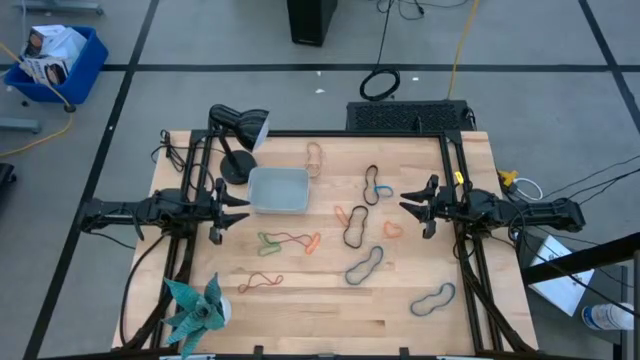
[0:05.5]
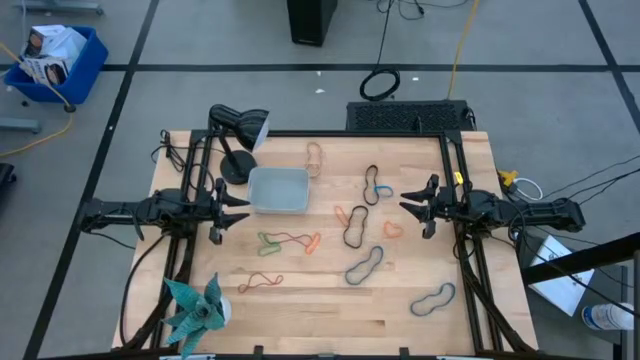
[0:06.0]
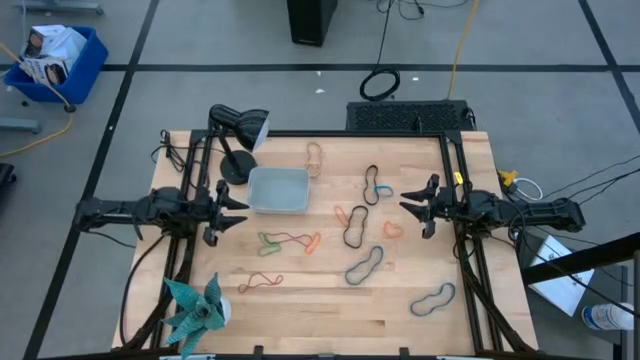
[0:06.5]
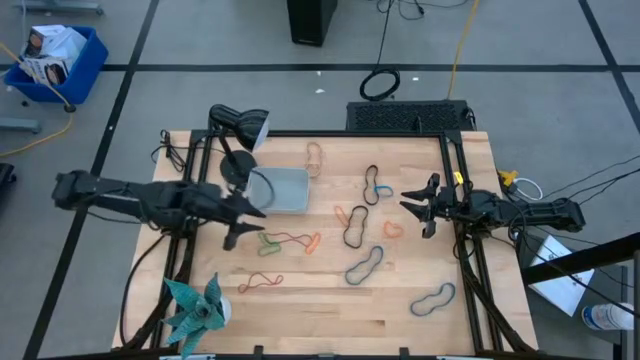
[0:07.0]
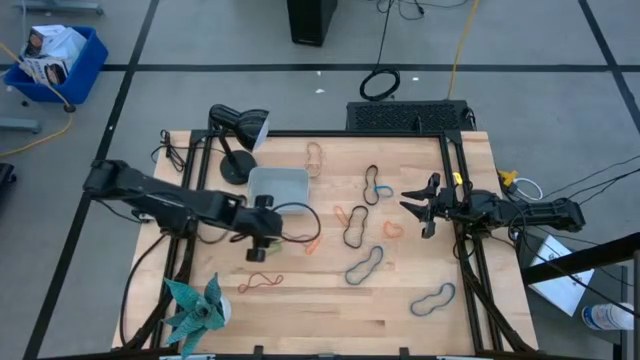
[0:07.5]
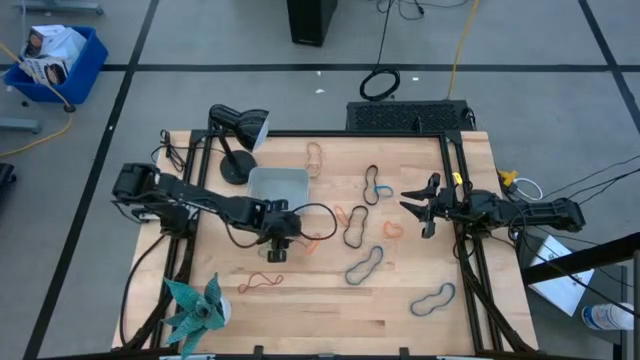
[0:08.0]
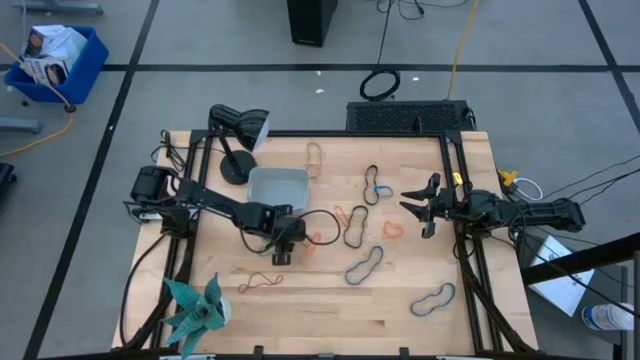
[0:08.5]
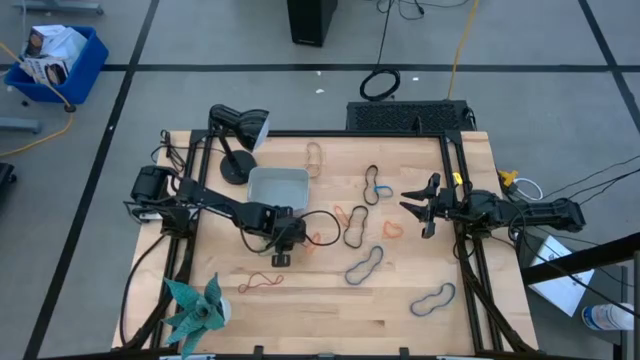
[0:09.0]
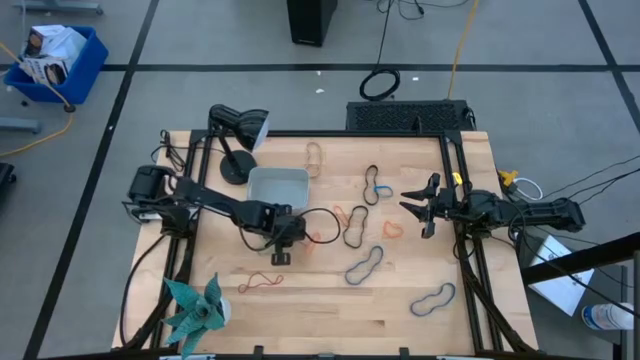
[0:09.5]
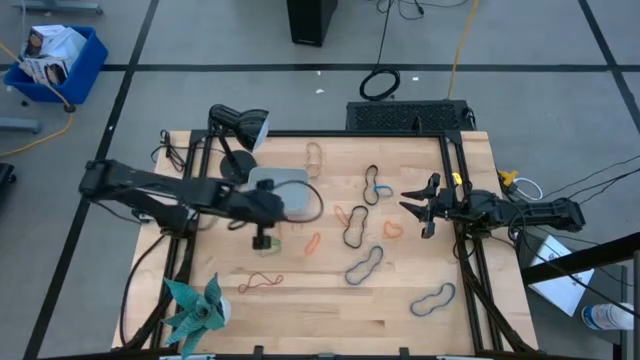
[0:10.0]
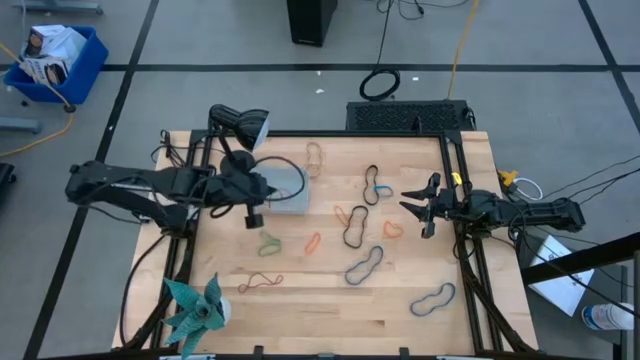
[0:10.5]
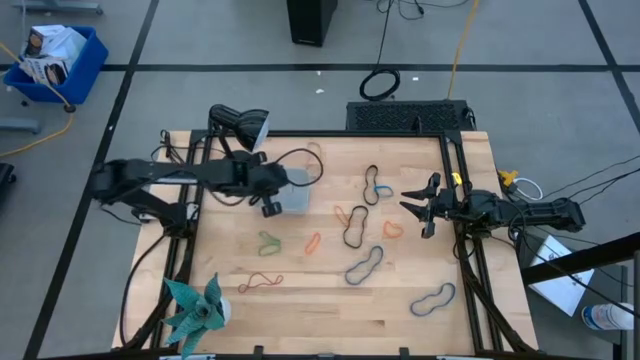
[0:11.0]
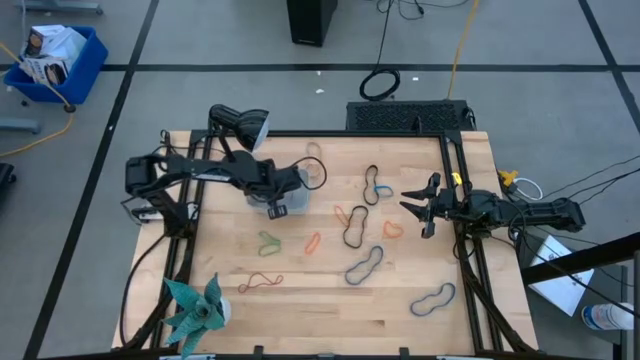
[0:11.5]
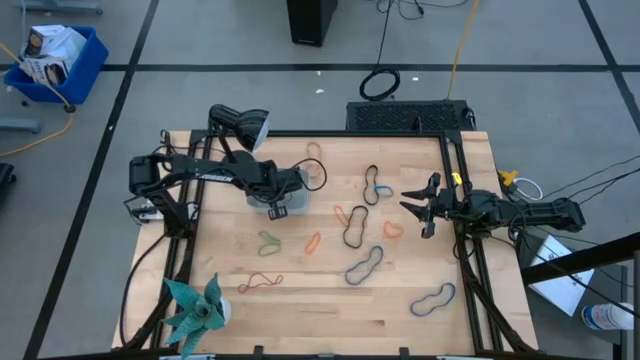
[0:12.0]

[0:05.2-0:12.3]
Task: Pick and place rubber bands into bin
Put the top red rubber band into the gray bin

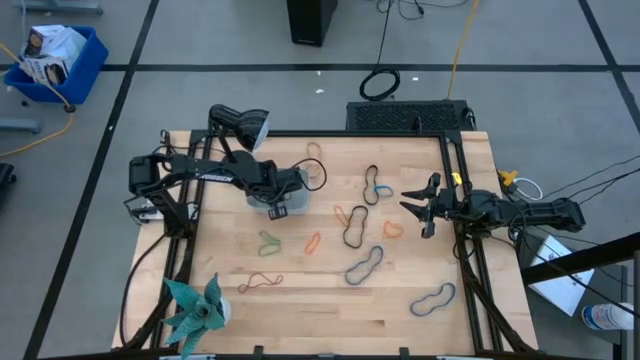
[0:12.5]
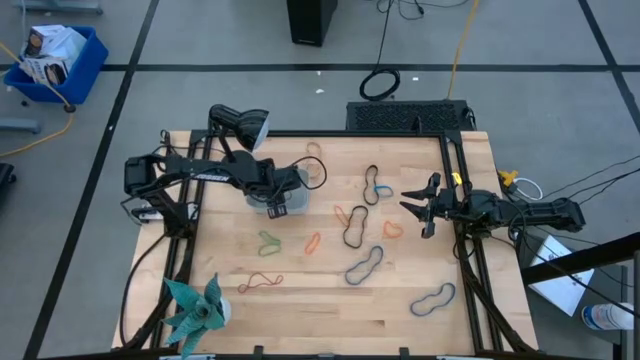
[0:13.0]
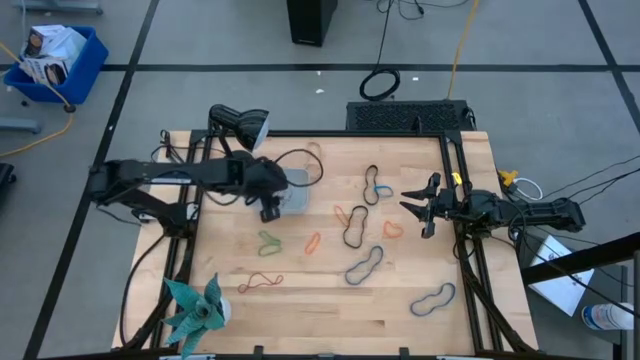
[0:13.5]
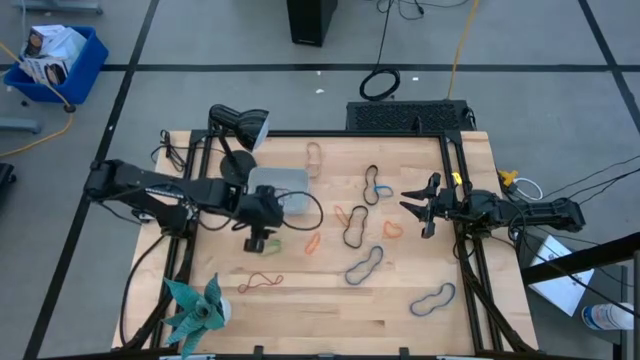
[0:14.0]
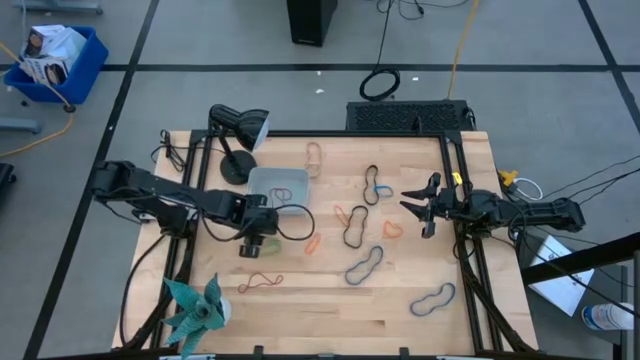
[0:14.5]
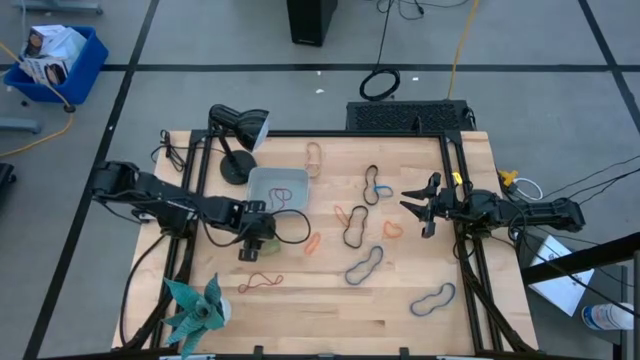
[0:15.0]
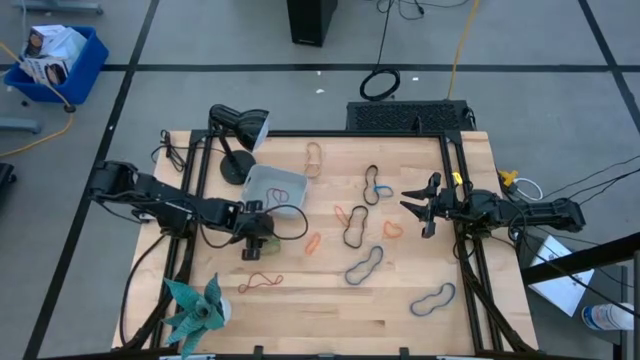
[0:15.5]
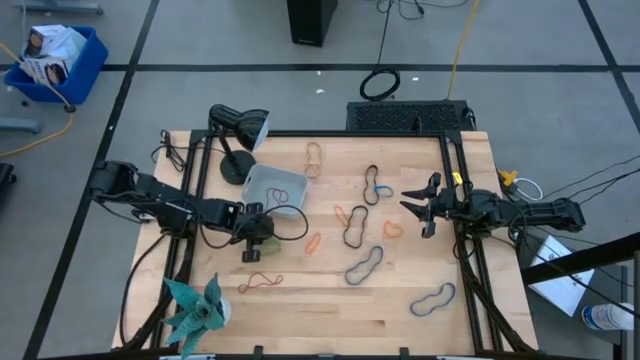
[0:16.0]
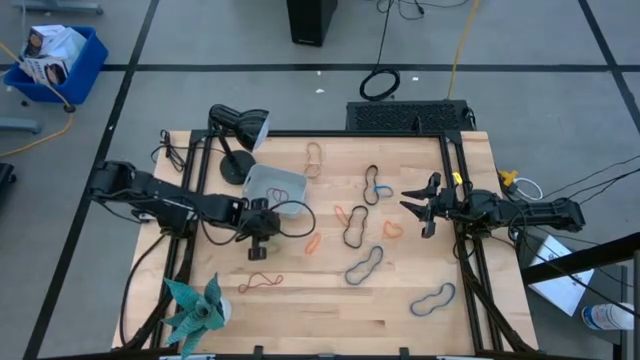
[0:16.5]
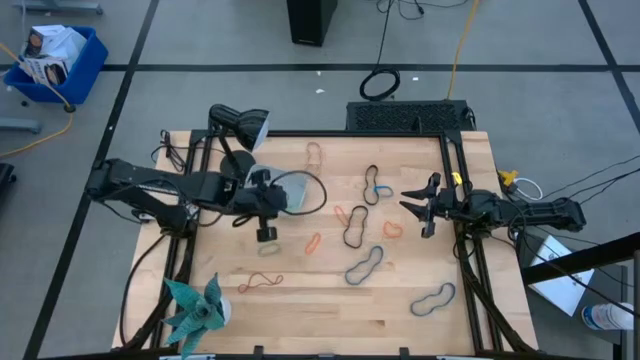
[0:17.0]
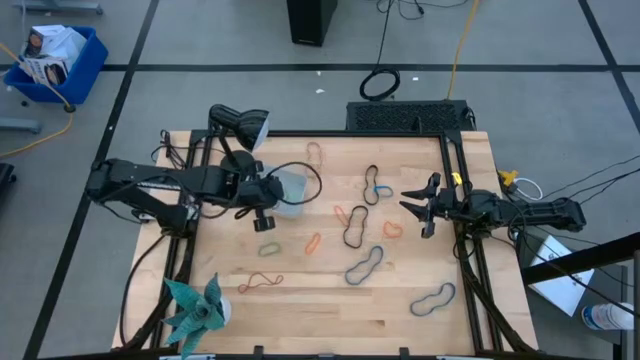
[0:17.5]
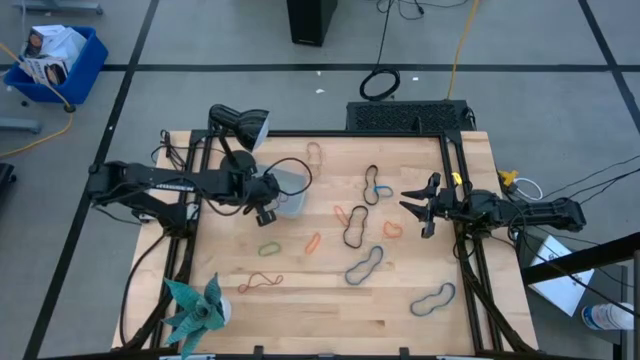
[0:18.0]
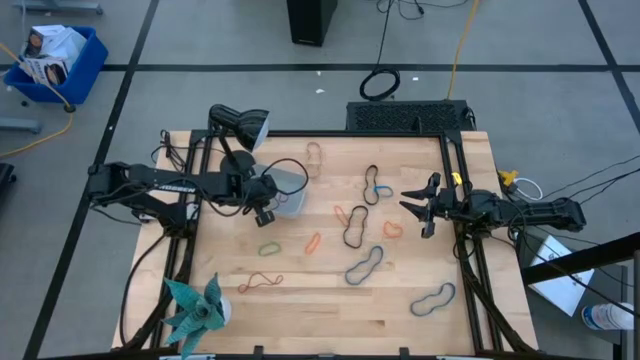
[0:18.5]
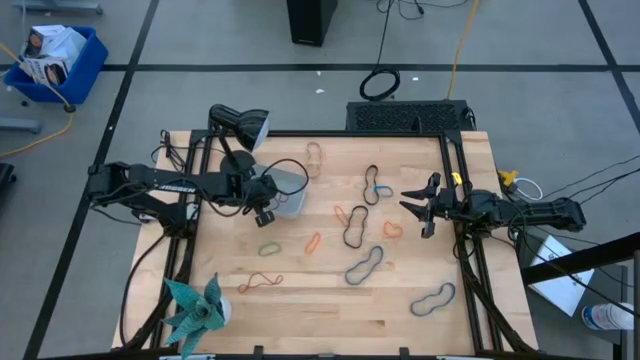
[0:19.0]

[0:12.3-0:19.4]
Put the top green rubber band into the gray bin

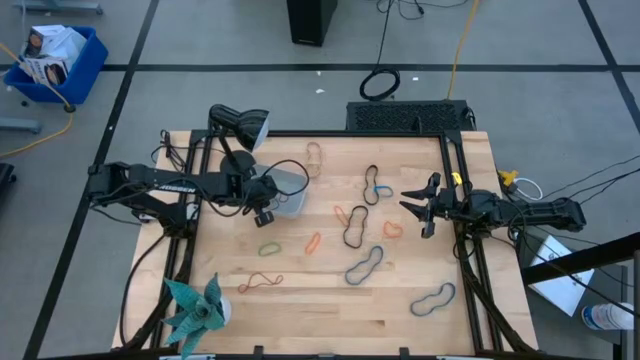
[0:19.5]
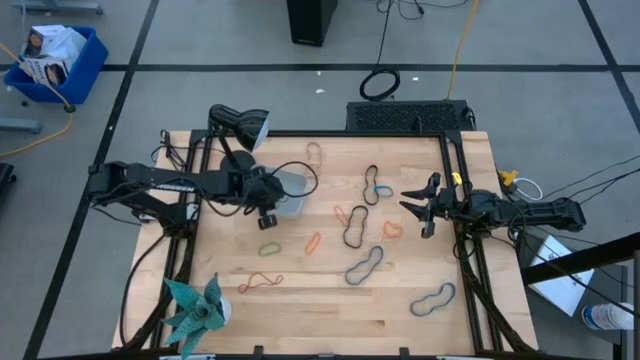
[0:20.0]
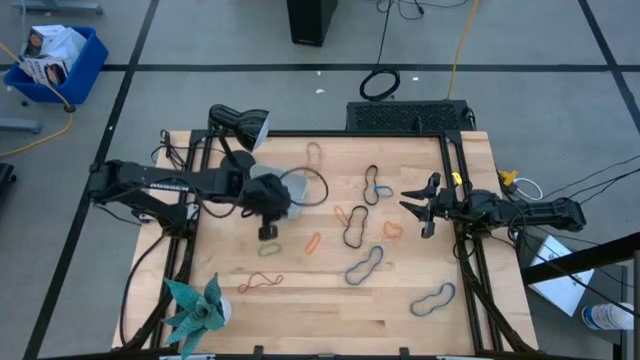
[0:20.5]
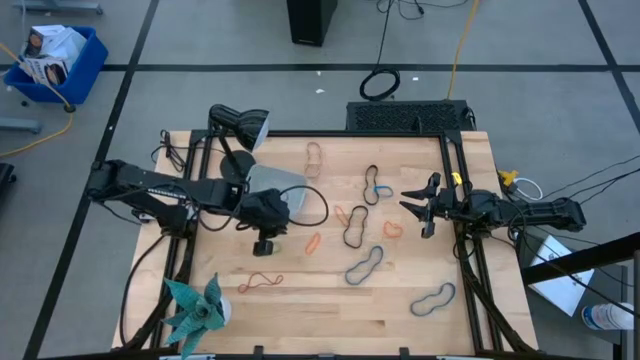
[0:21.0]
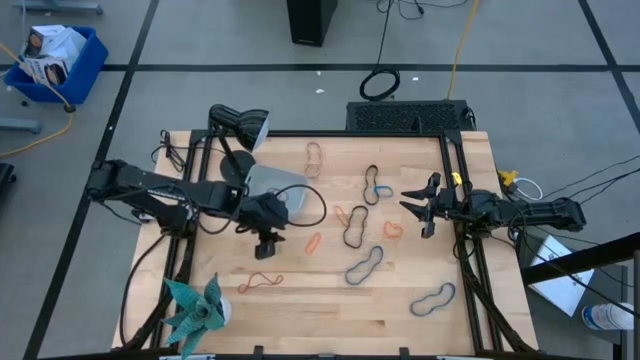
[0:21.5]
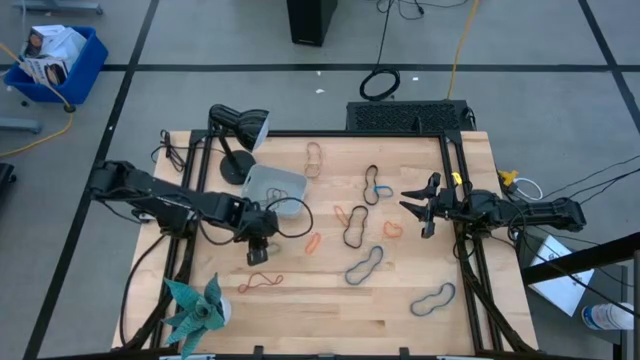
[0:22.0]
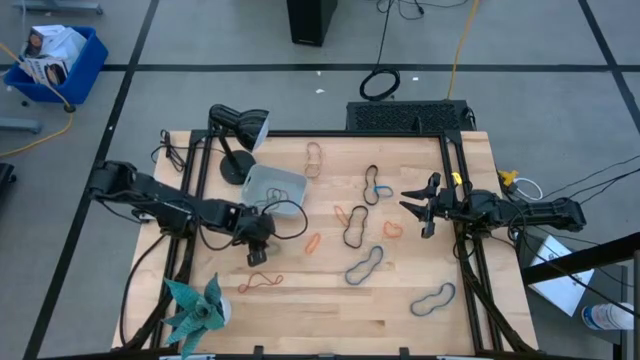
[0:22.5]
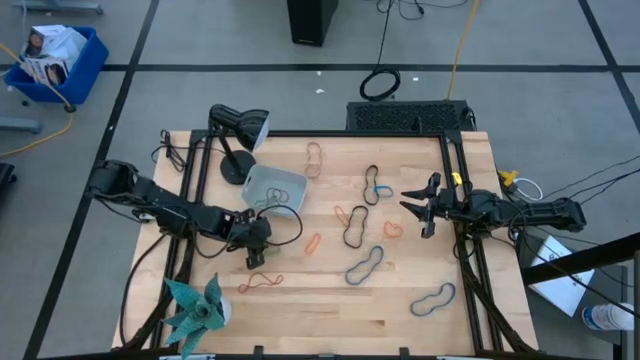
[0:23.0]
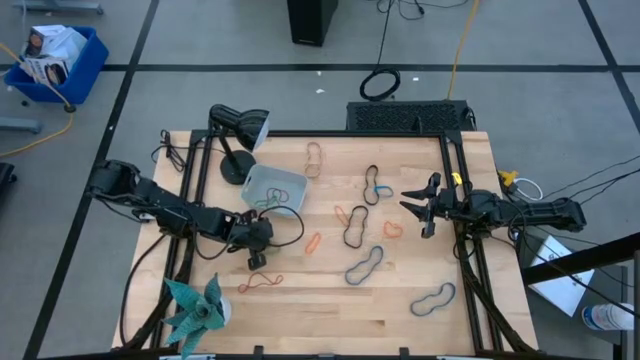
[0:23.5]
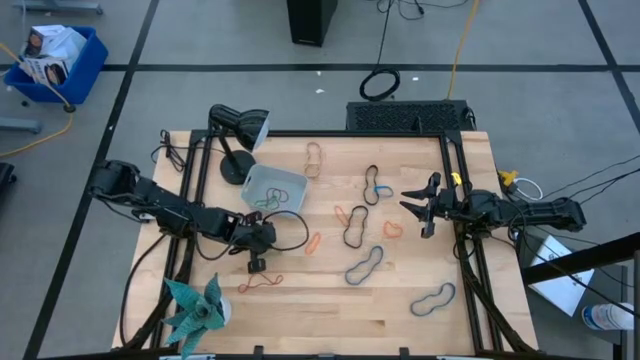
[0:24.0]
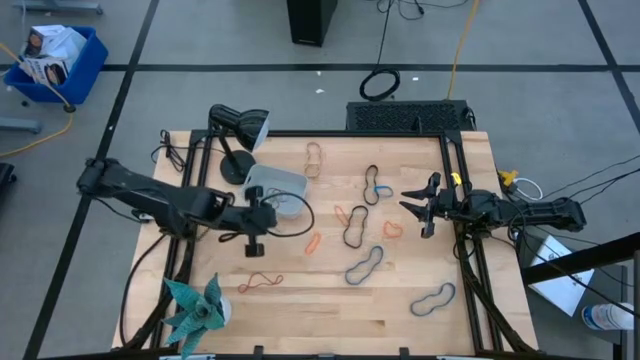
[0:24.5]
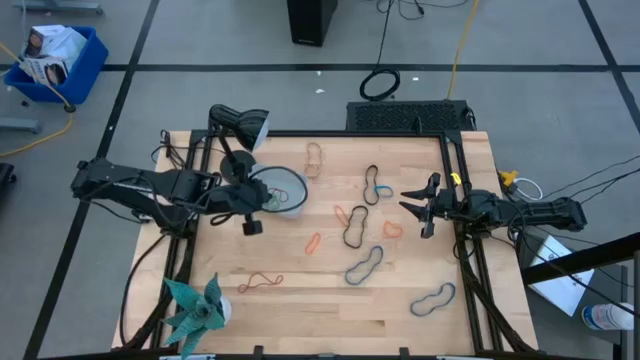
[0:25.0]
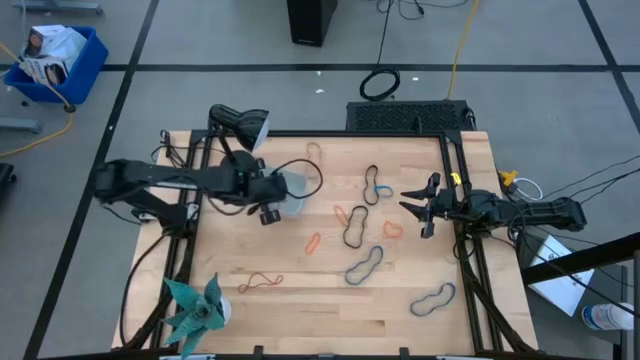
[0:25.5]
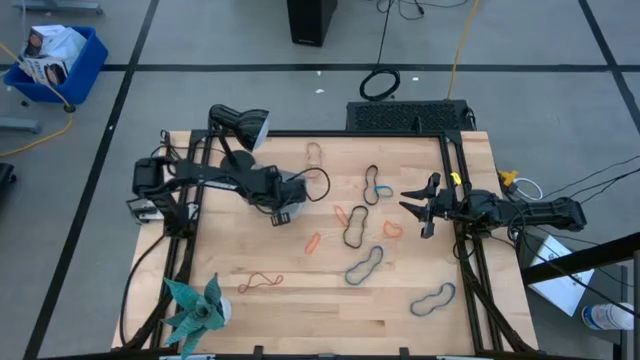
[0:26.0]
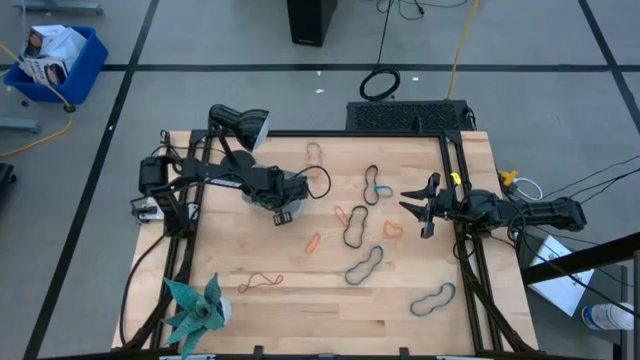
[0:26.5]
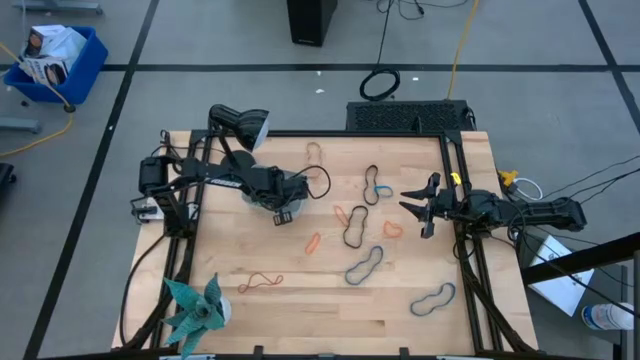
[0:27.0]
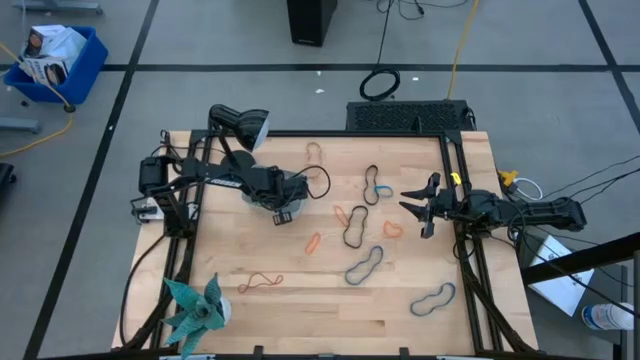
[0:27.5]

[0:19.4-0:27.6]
Put the green rubber band into the gray bin
